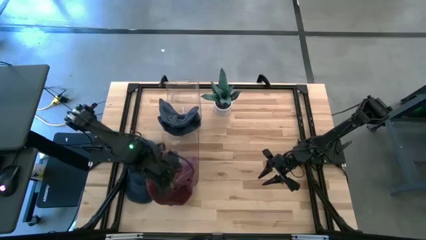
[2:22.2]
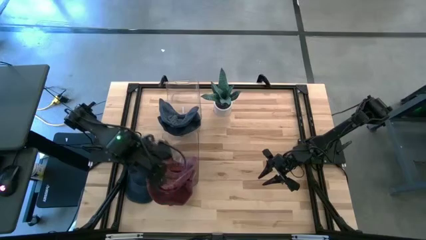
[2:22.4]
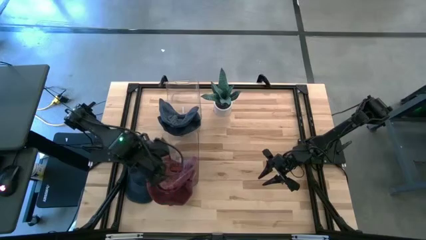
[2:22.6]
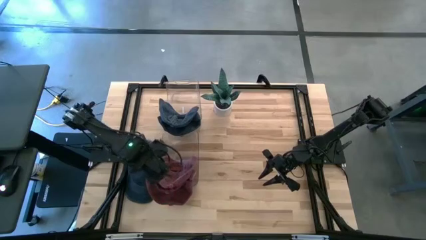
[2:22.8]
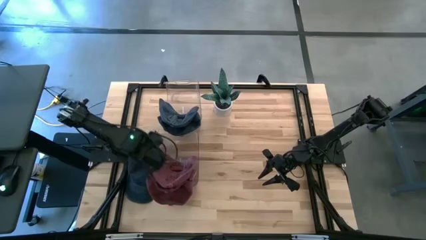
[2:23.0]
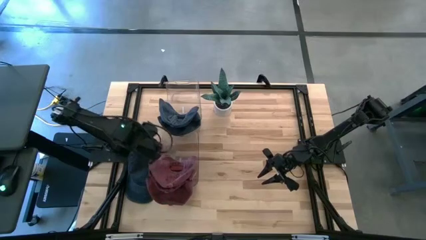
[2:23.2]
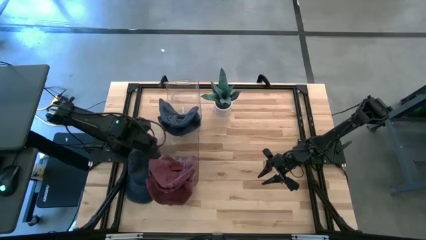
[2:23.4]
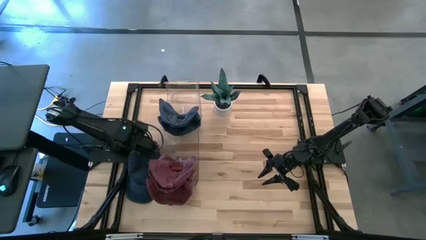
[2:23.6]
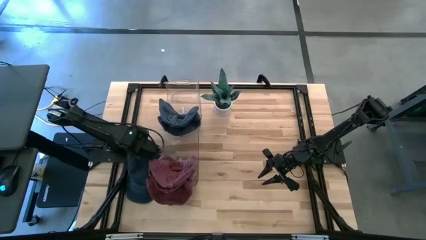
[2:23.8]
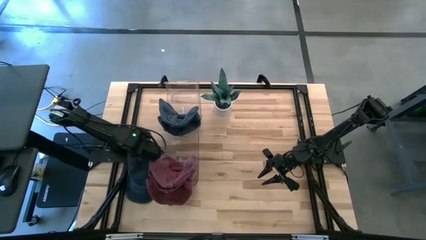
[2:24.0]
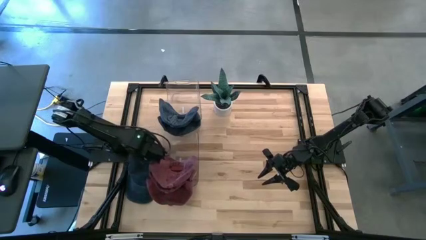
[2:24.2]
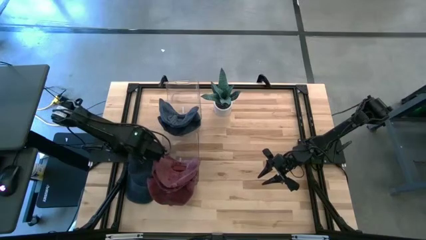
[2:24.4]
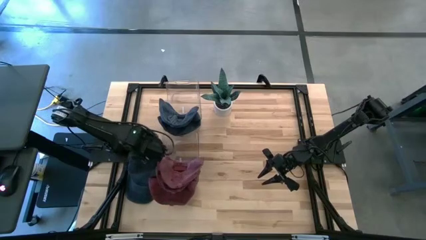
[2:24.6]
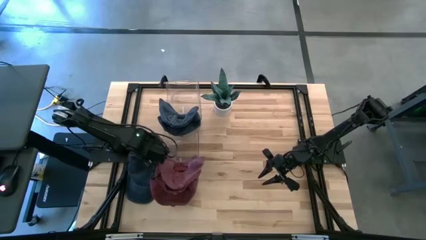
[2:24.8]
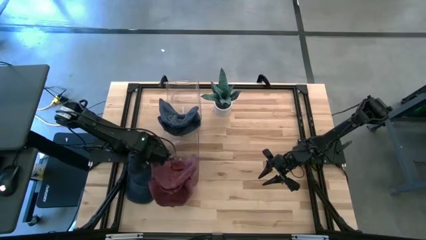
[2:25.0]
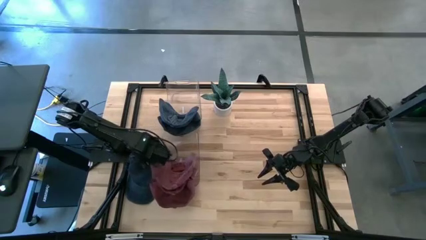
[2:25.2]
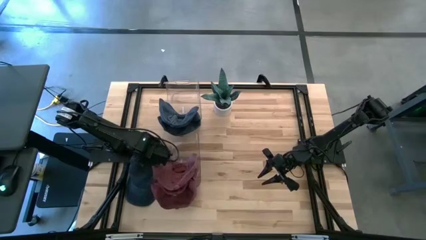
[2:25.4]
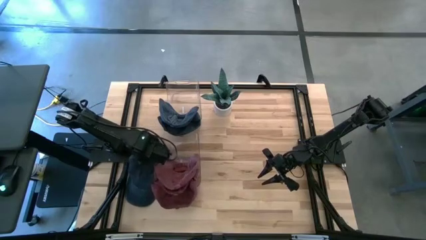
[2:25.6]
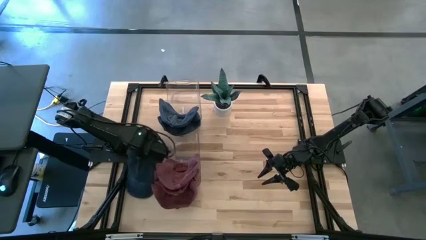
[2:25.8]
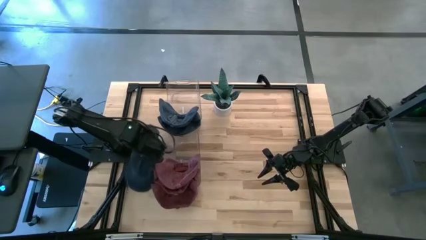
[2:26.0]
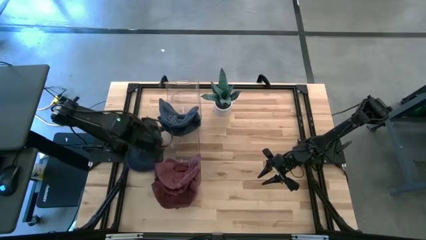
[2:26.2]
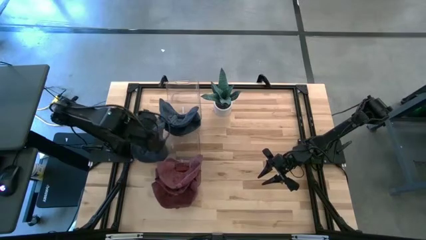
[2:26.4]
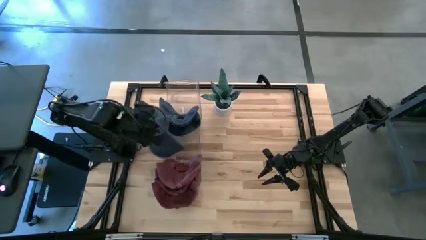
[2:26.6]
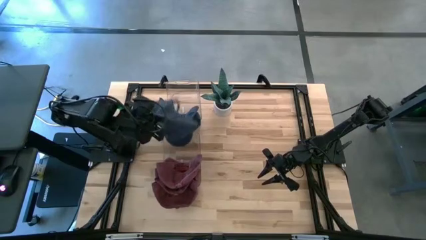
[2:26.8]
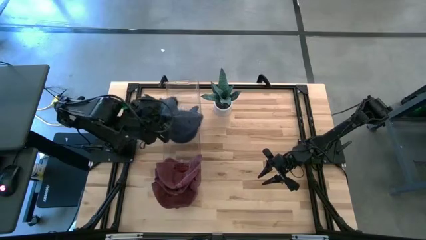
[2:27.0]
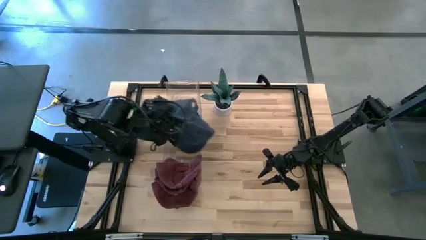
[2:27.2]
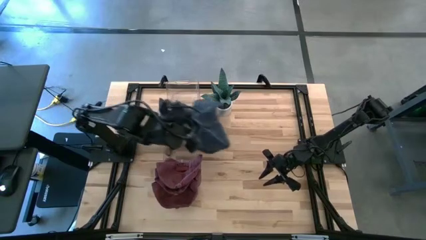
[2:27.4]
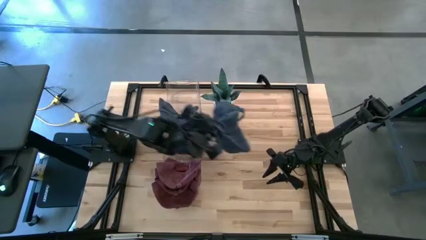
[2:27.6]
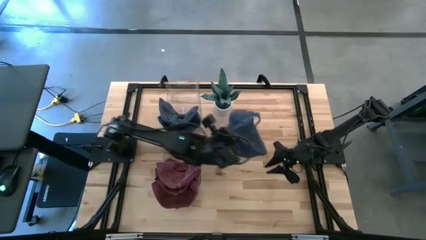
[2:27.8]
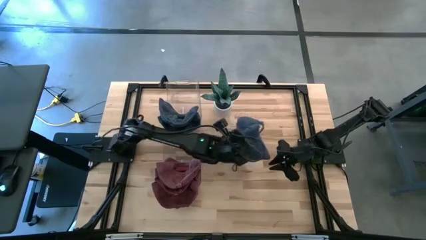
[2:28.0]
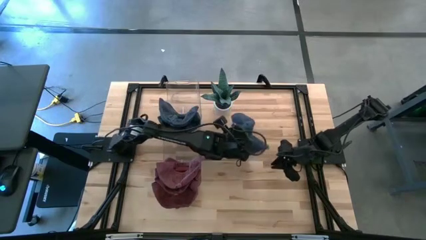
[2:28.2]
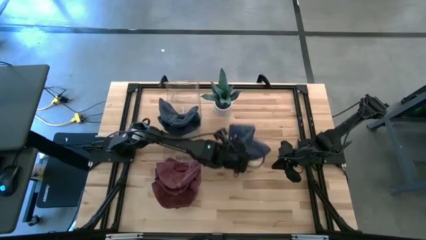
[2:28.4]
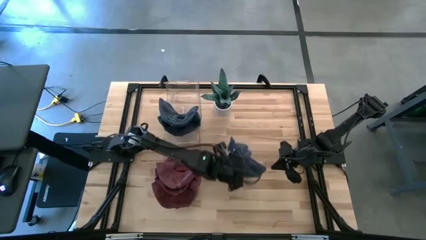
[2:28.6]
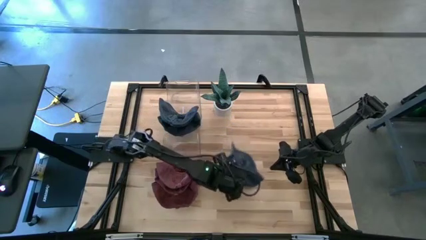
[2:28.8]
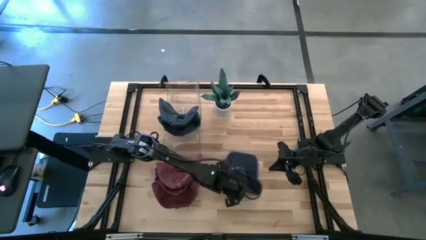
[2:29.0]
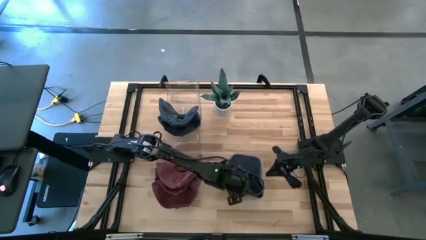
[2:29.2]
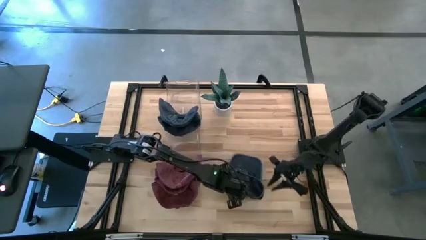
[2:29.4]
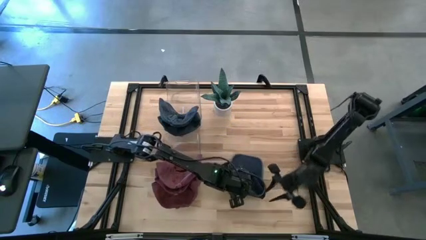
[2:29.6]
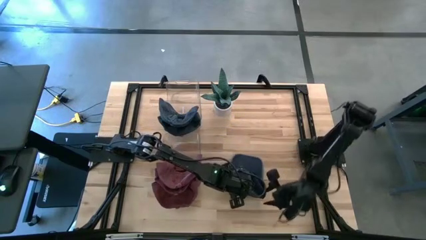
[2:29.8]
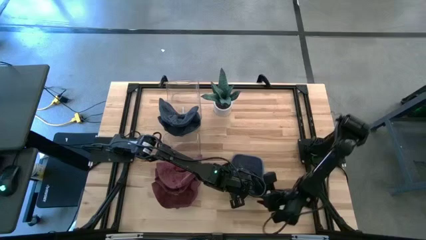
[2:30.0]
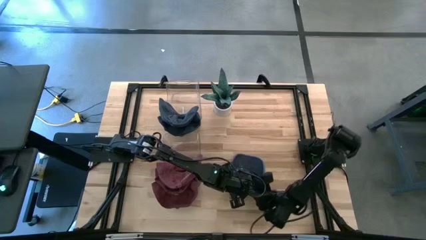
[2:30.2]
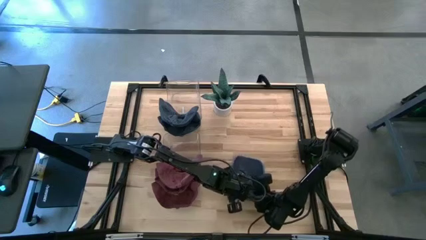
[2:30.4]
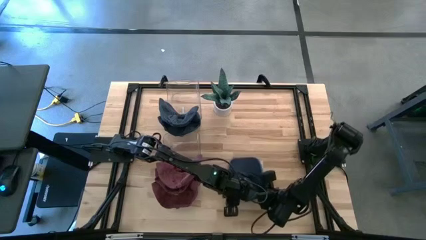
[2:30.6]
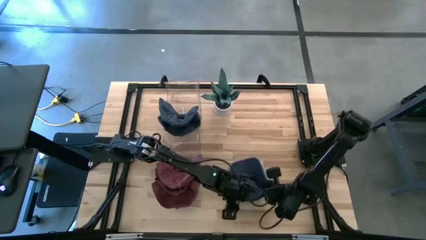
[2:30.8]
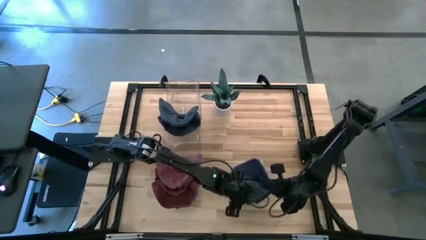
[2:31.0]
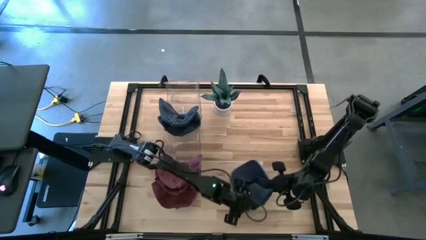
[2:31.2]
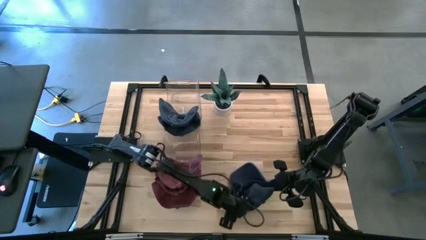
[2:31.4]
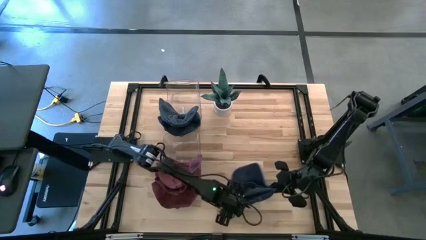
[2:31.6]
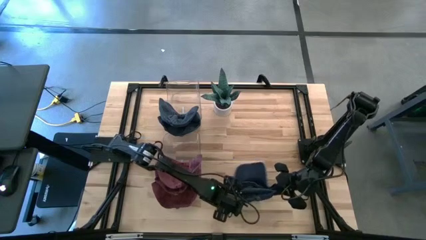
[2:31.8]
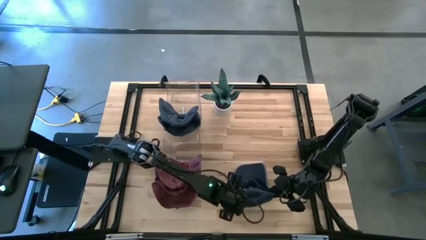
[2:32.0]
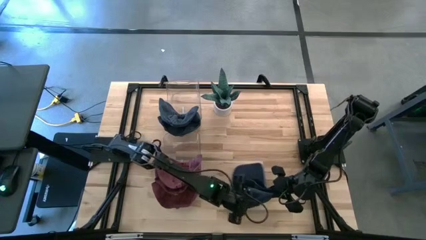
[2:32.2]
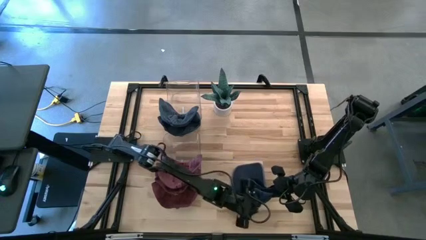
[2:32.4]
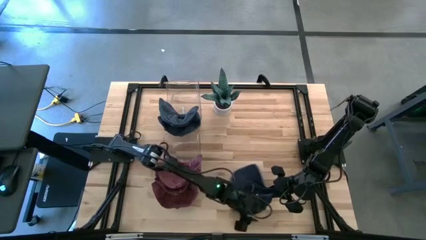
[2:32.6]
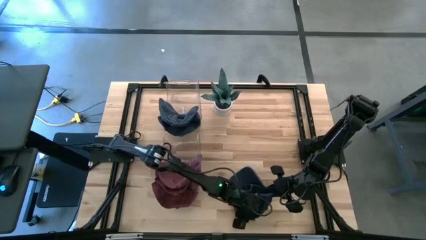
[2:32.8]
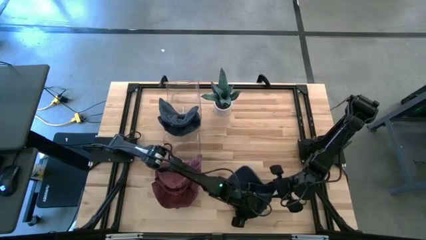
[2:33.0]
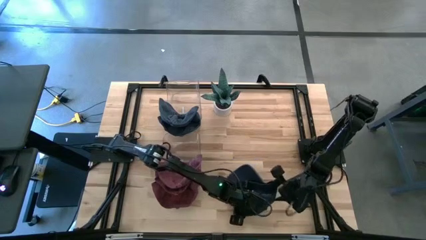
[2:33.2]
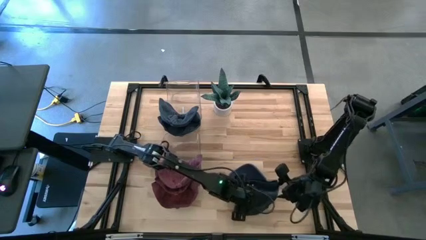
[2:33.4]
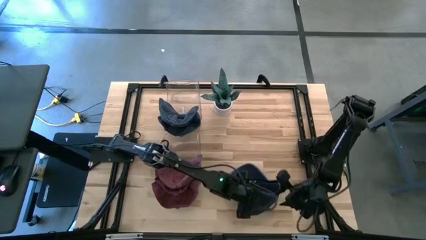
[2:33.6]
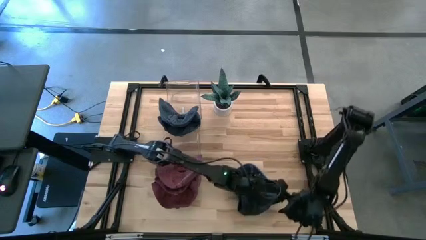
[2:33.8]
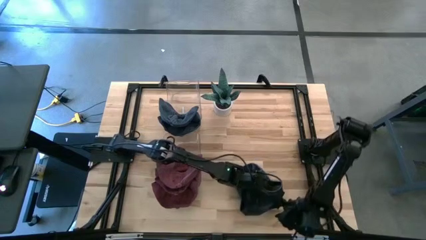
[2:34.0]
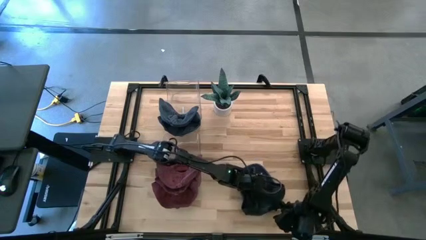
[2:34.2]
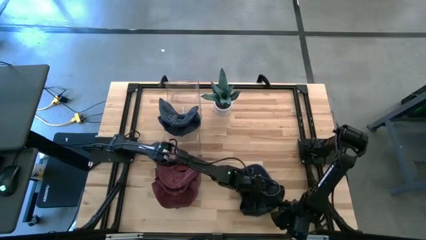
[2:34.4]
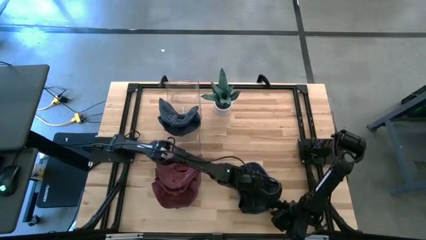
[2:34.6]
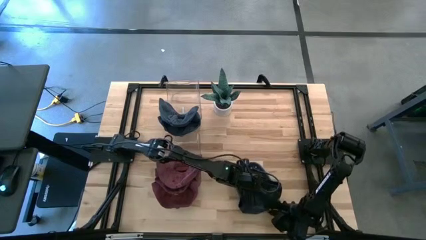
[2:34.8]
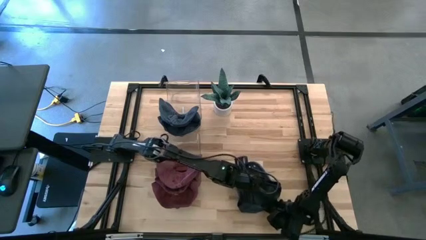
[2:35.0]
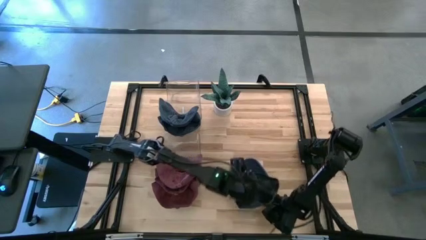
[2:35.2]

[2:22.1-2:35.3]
Task: Pick & Place hat
Put the blue cap into the top transparent bin

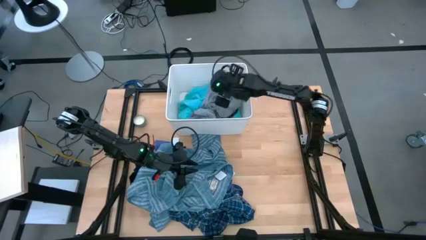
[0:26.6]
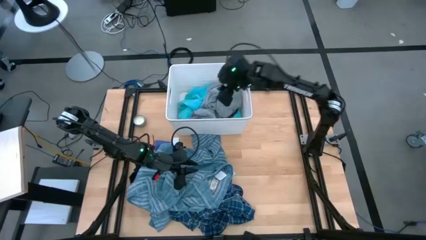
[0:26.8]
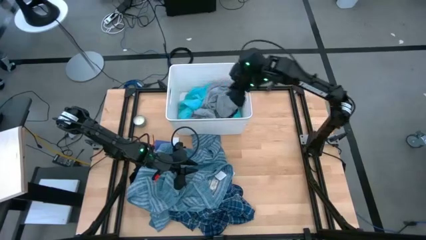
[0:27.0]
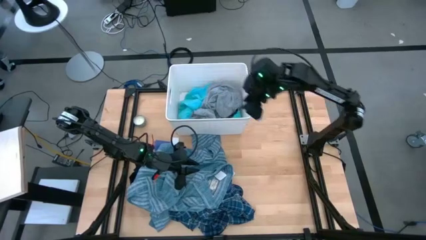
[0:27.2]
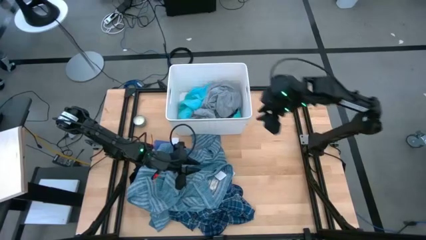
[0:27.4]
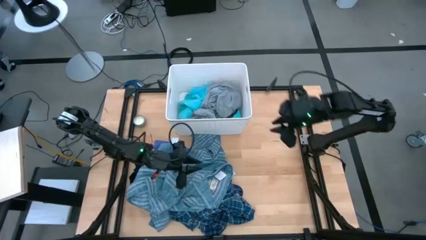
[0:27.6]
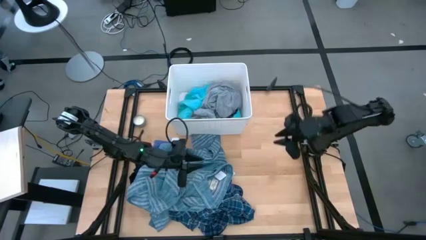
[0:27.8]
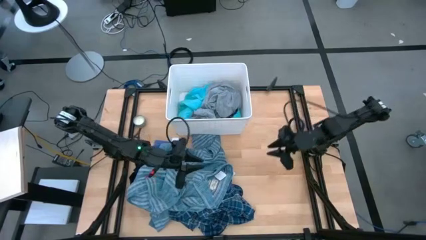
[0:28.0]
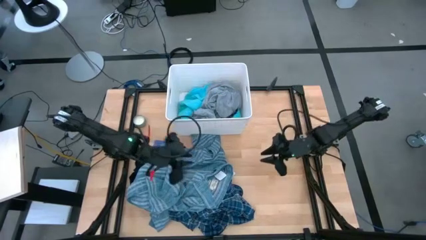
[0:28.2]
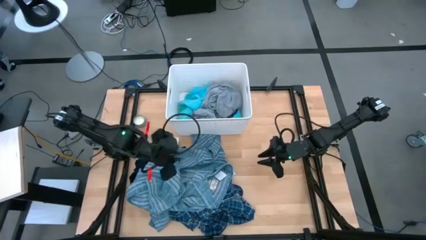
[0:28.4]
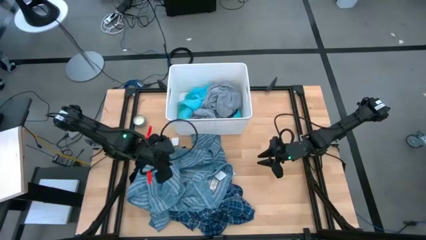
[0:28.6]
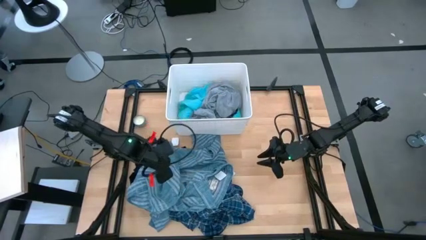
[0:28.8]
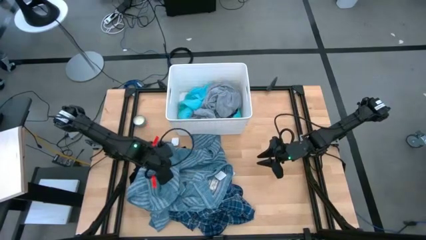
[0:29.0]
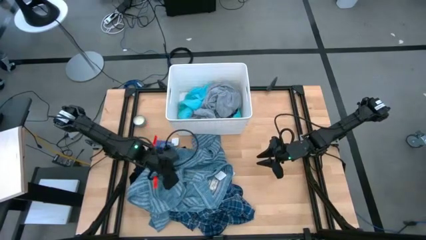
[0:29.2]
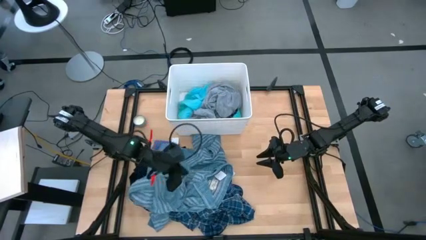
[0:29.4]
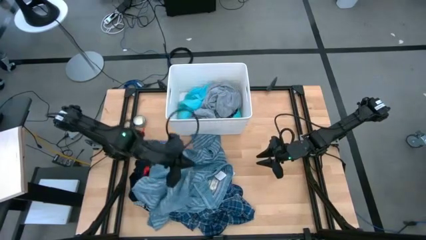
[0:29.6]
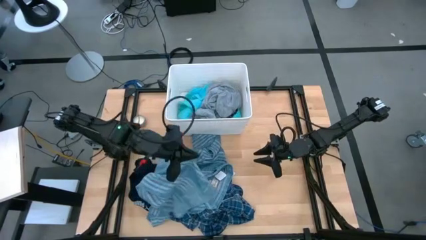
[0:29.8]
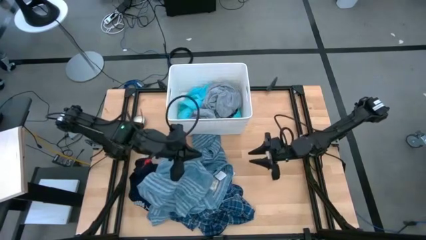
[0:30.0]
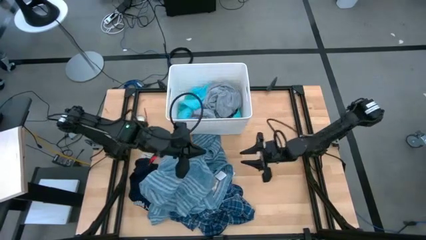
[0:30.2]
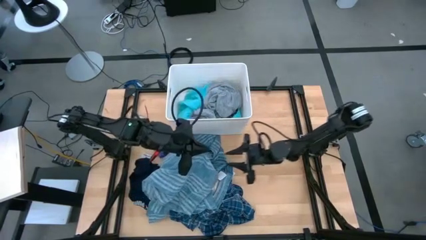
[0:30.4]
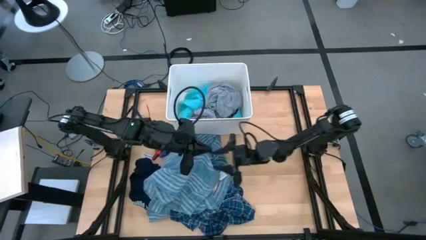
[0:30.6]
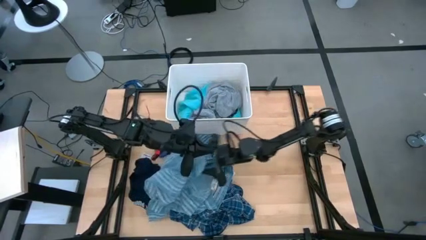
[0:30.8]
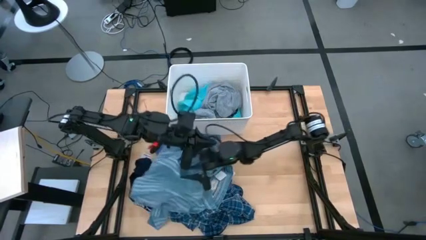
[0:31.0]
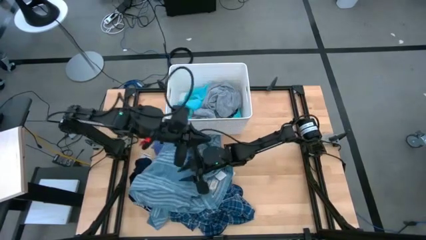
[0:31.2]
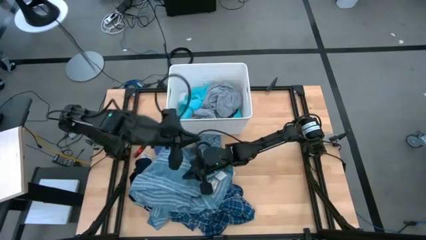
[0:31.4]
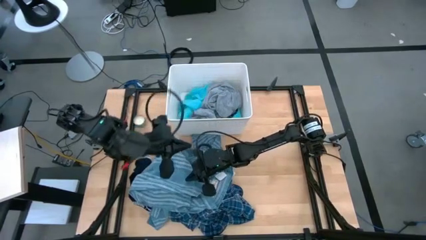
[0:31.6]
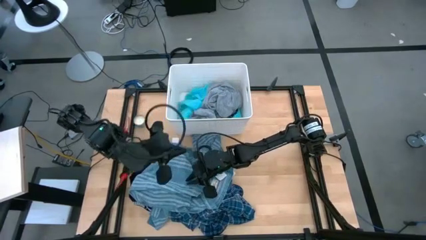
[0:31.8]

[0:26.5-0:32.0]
Task: Sort clothes
Put the light blue and white patterned shirt into the white laundry bin
